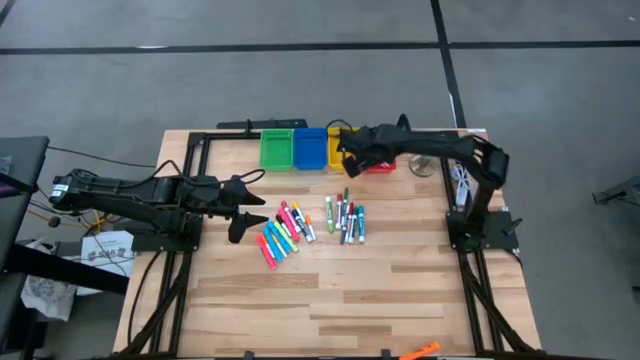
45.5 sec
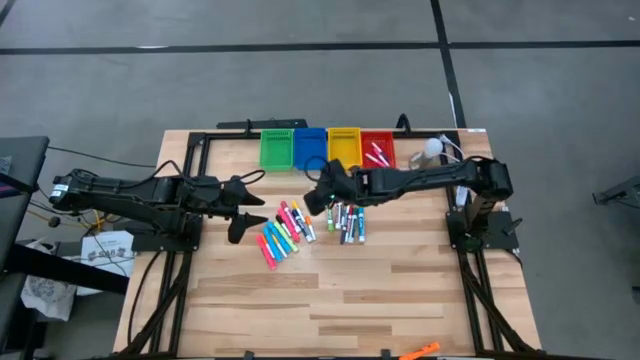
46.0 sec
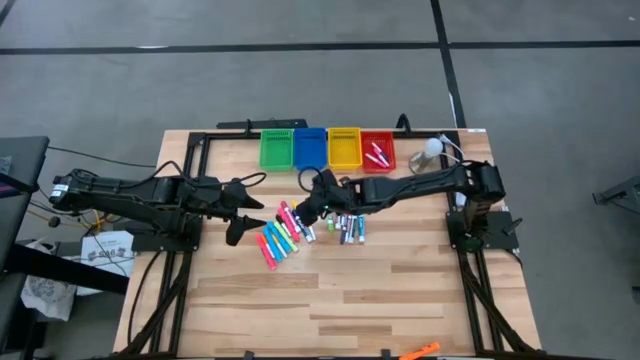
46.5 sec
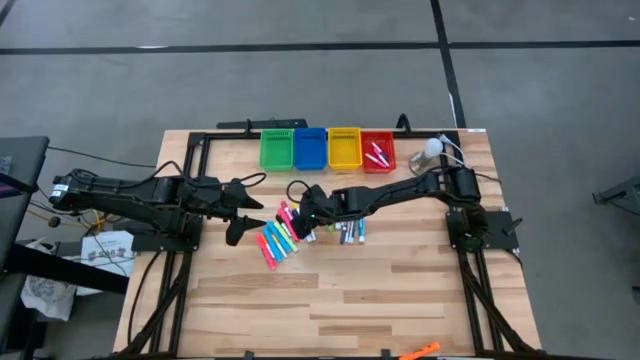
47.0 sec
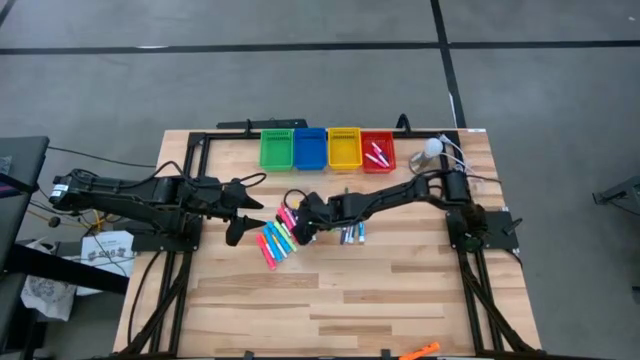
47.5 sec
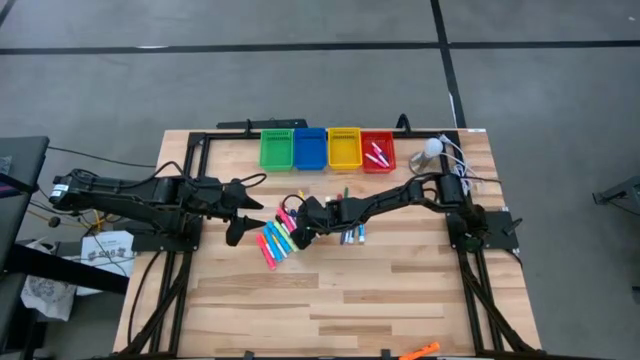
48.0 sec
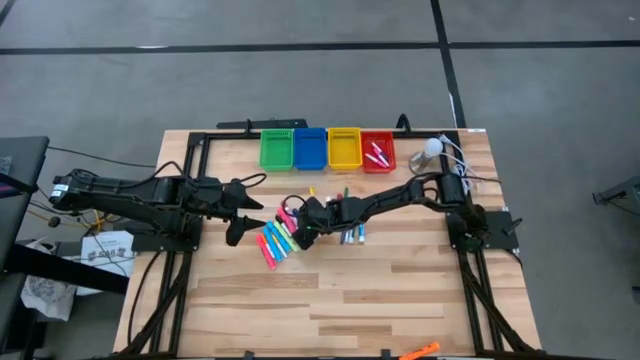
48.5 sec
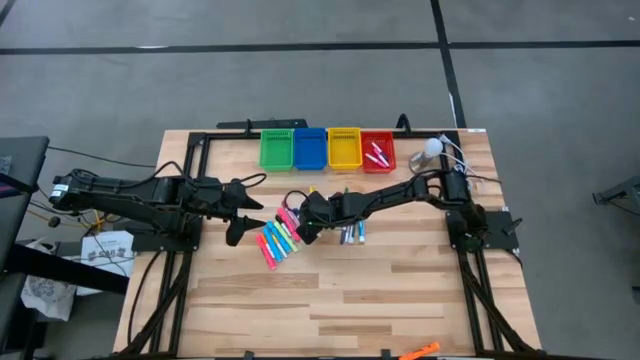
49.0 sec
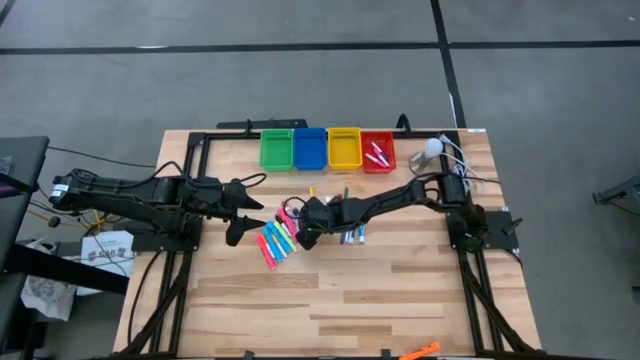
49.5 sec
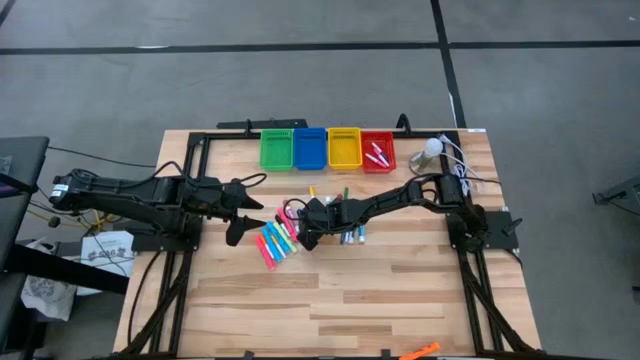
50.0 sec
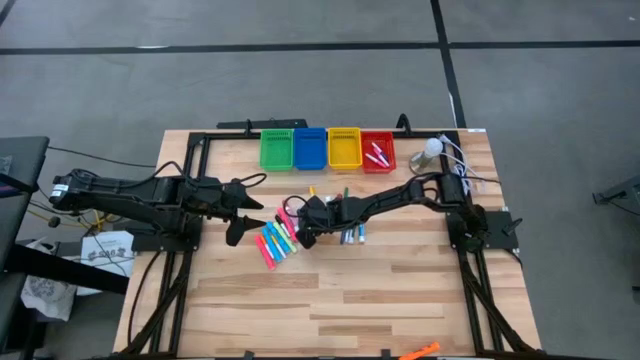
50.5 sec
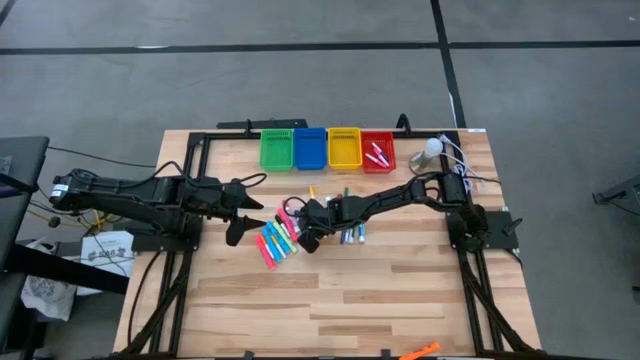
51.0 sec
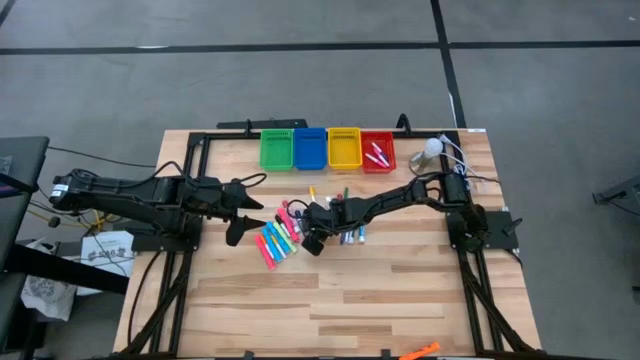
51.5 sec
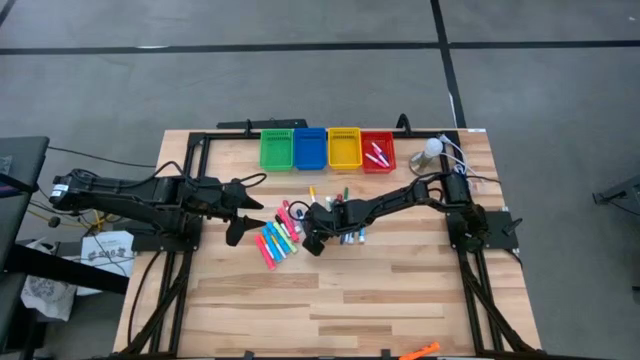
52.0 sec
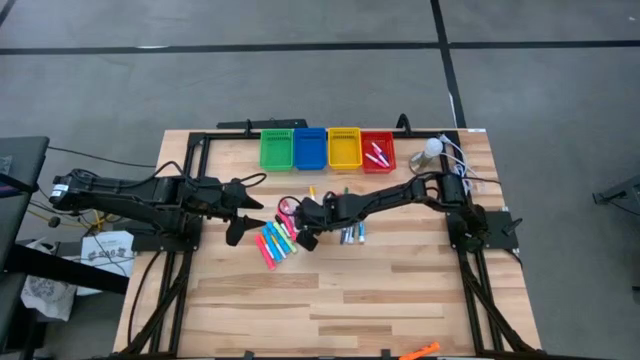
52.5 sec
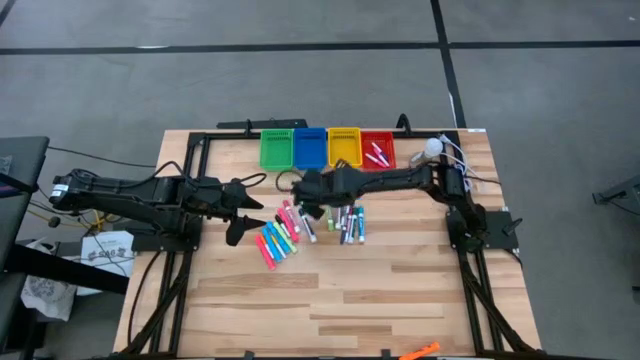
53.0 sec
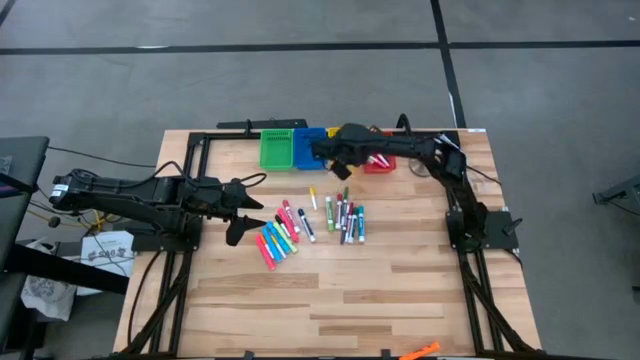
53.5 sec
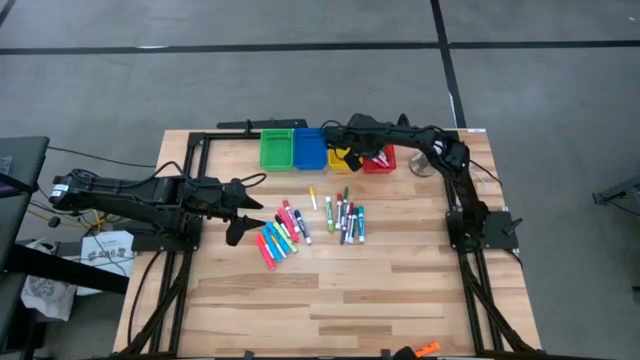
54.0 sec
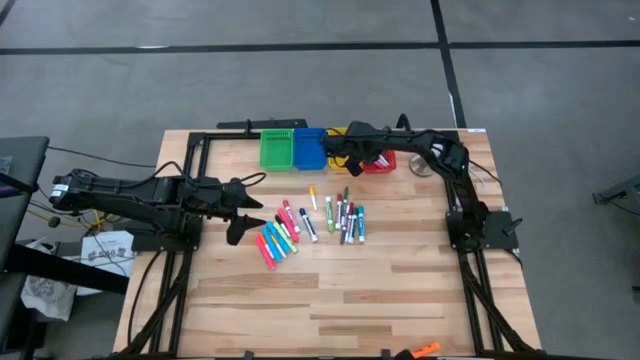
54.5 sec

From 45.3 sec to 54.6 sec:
Task: Pick & Place Markers
Put the right orange mini marker into the red basket

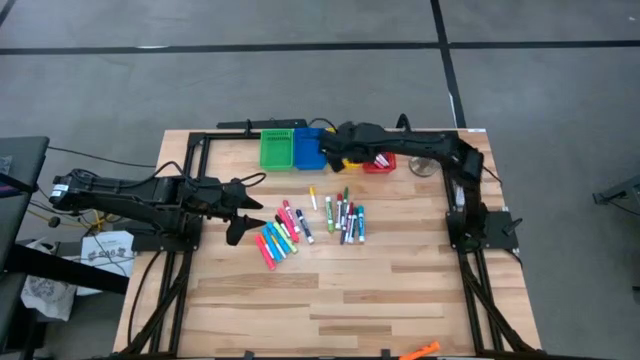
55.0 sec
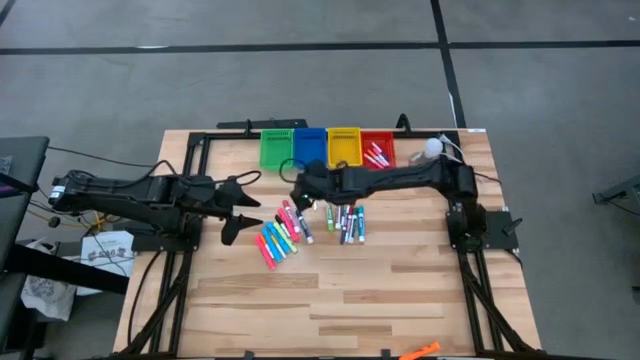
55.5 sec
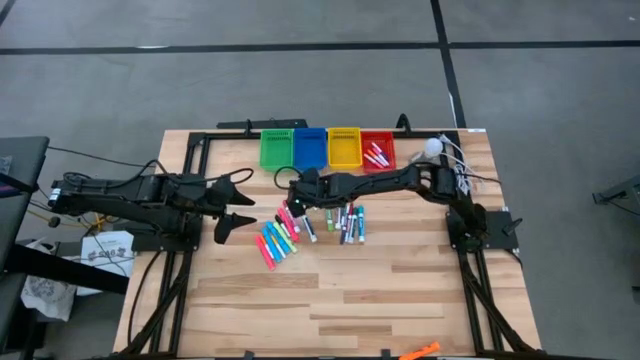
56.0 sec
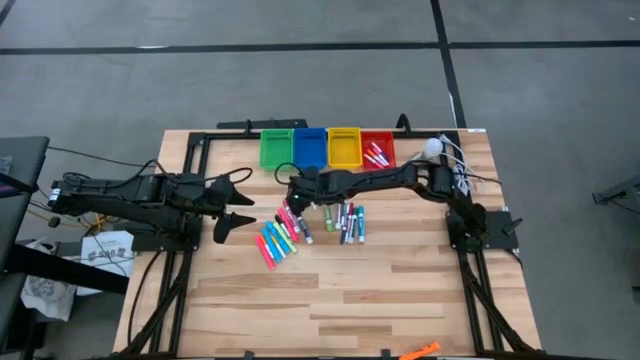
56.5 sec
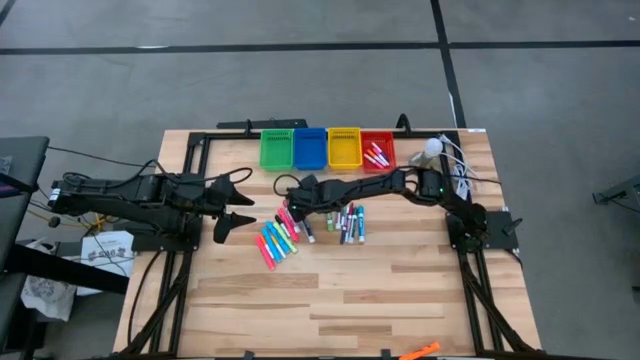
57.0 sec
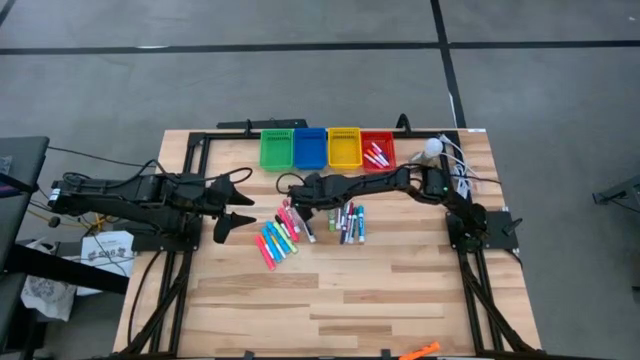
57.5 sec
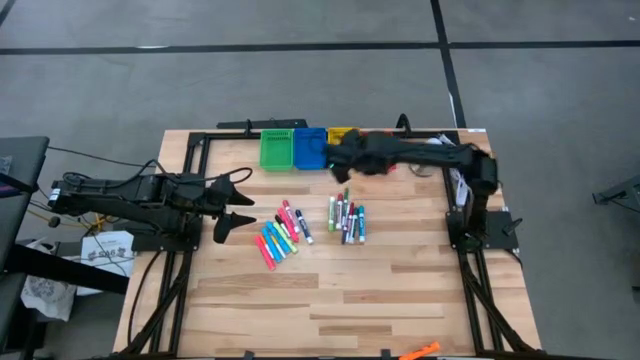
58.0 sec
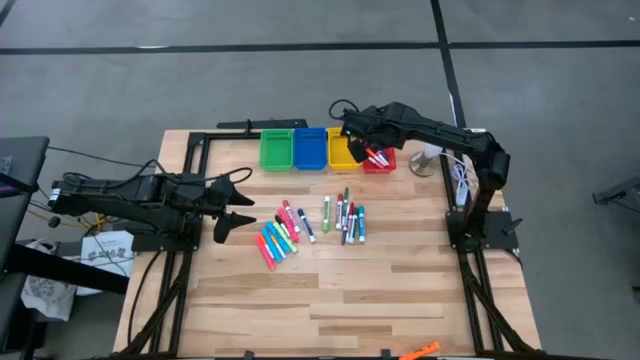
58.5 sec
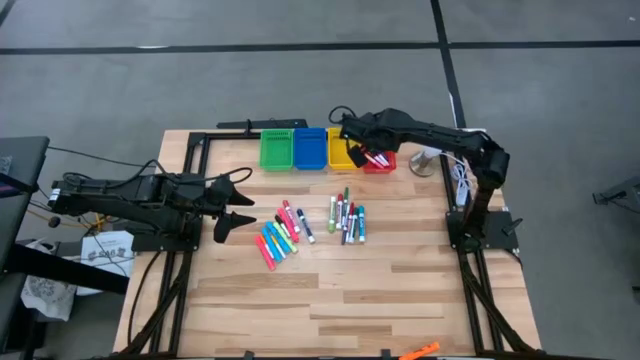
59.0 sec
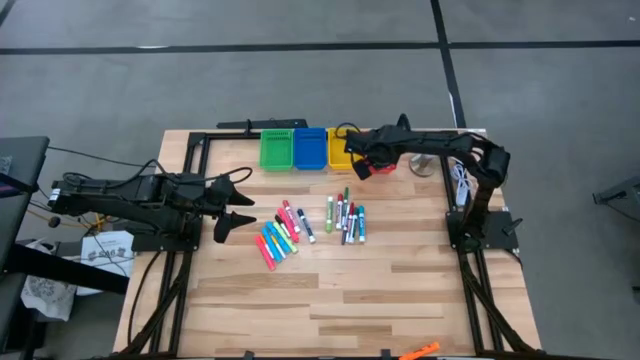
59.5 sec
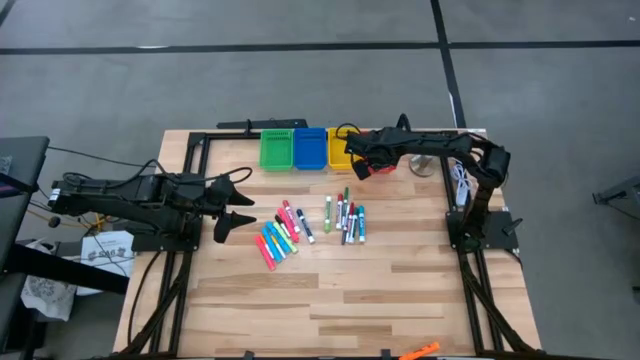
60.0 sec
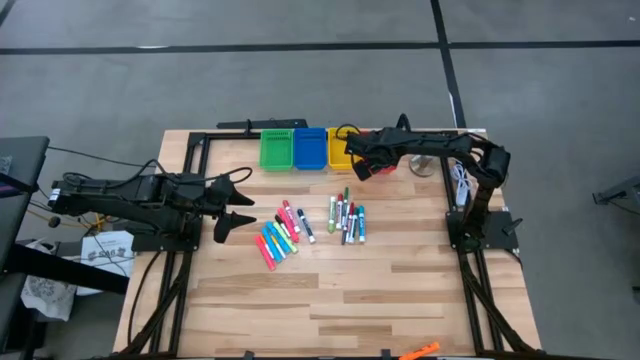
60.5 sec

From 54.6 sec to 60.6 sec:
Put the top yellow mini marker into the red basket

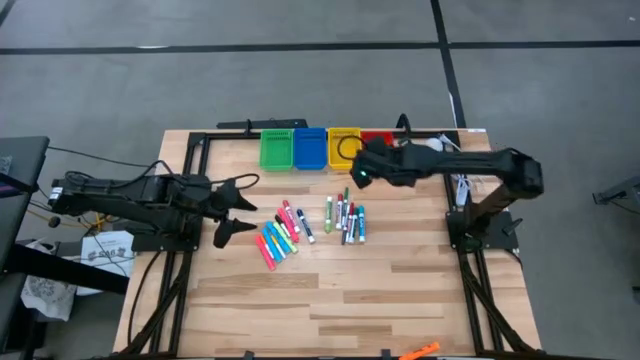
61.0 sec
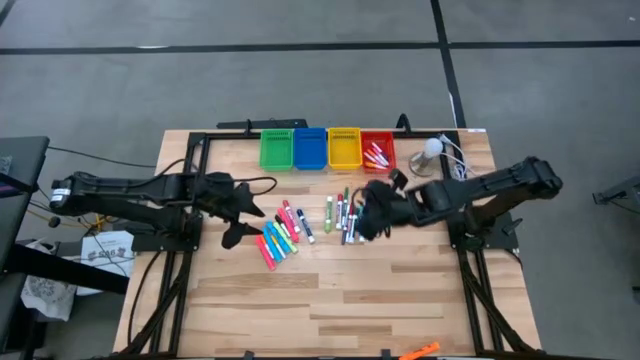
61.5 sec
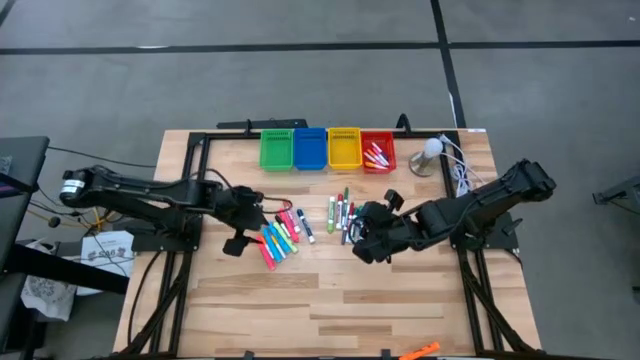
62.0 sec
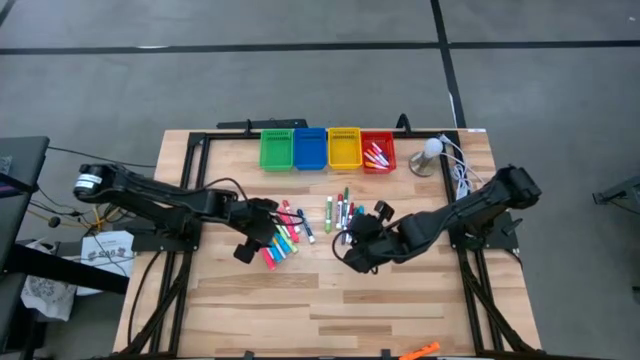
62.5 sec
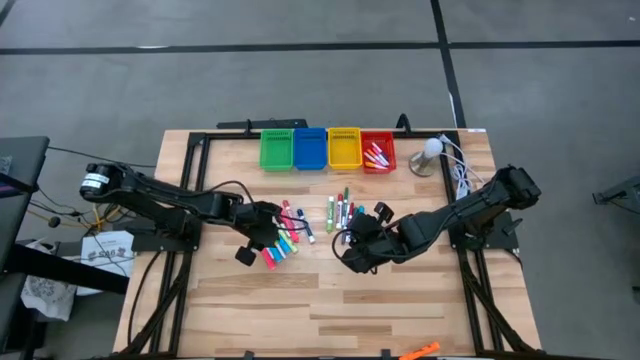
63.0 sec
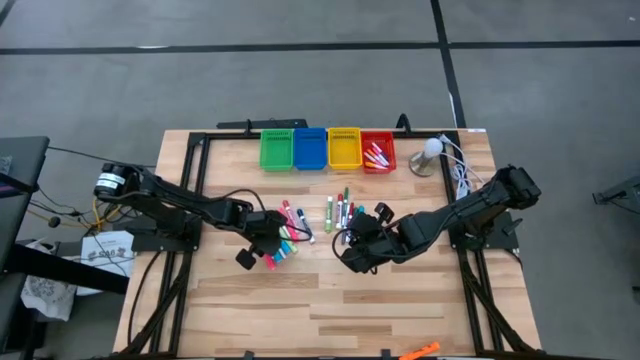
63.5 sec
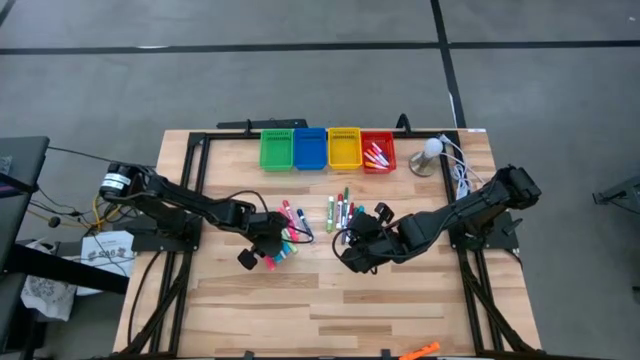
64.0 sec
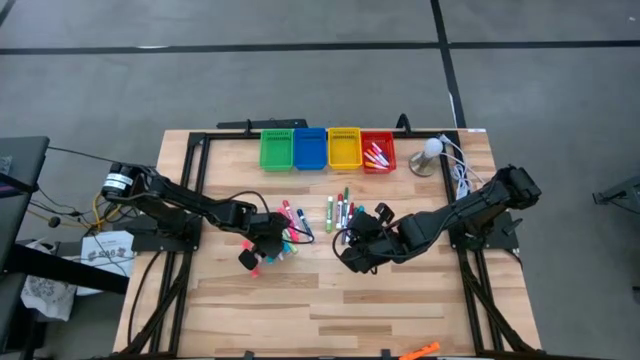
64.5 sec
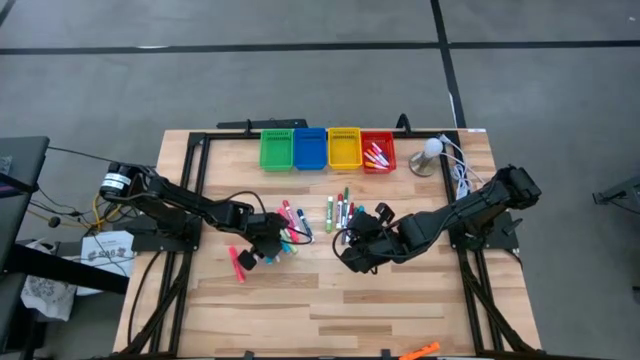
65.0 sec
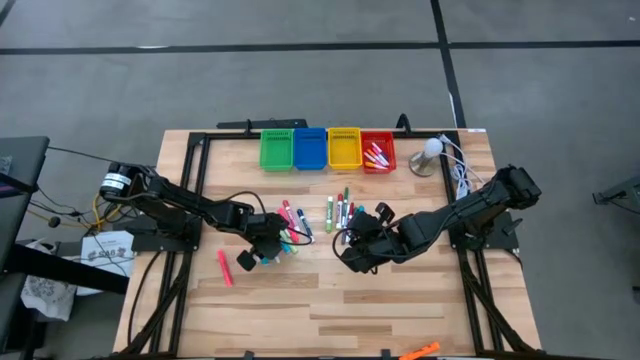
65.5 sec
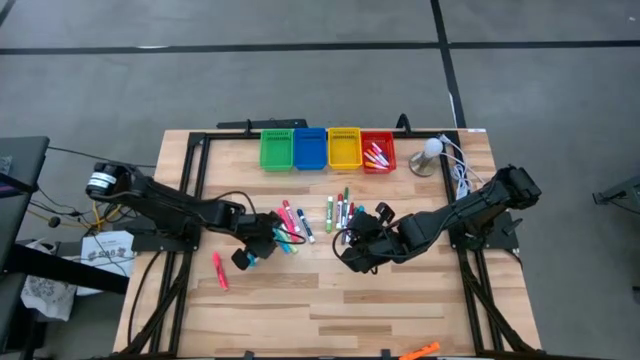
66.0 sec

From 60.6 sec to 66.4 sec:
Put the yellow mini marker into the red basket
